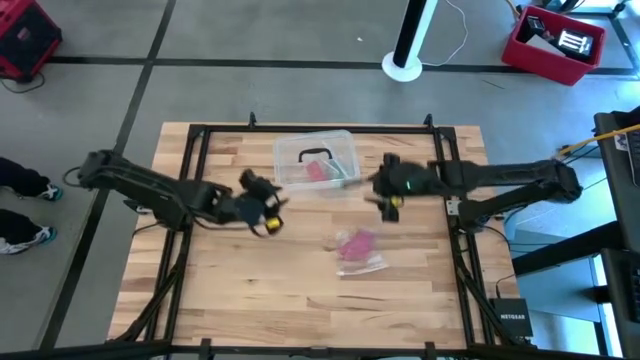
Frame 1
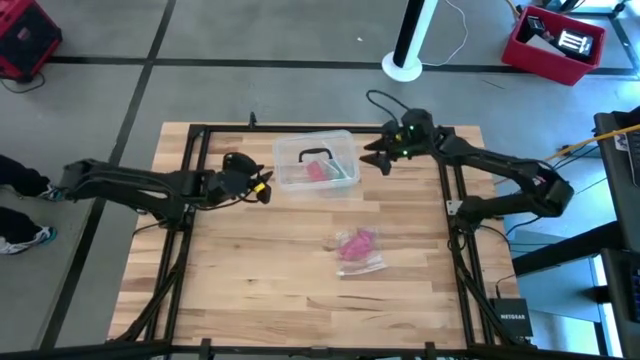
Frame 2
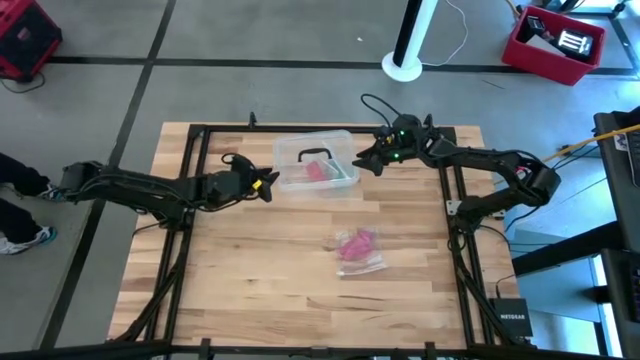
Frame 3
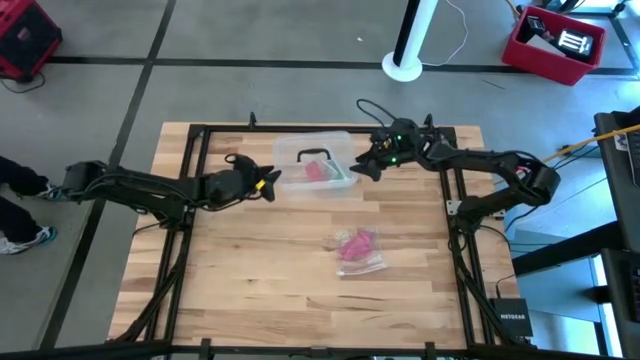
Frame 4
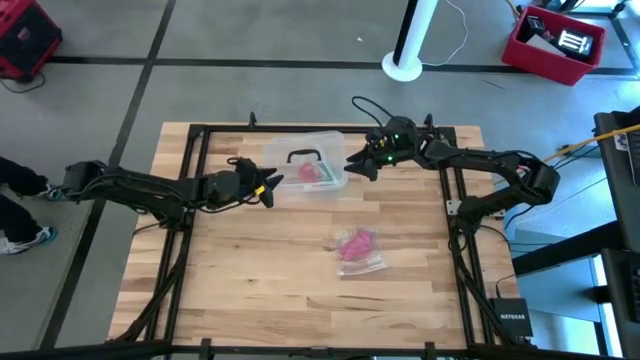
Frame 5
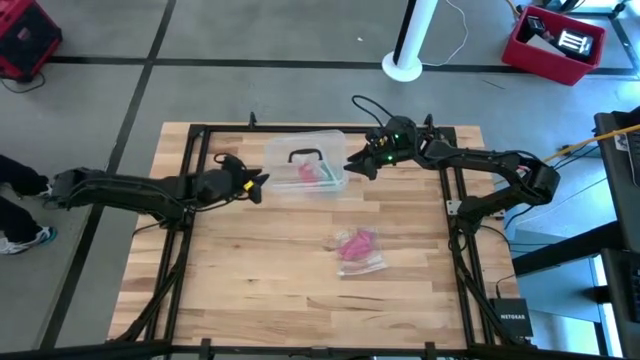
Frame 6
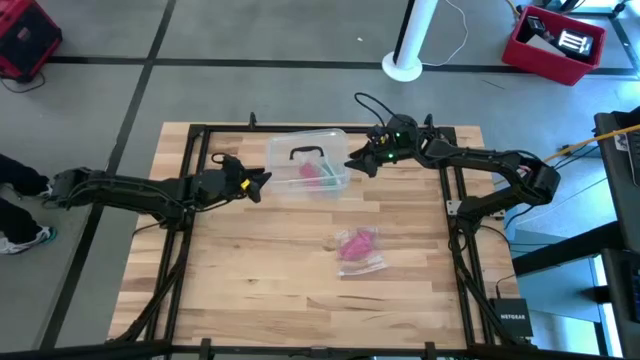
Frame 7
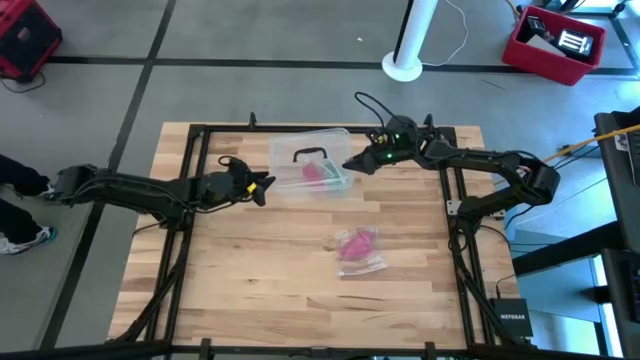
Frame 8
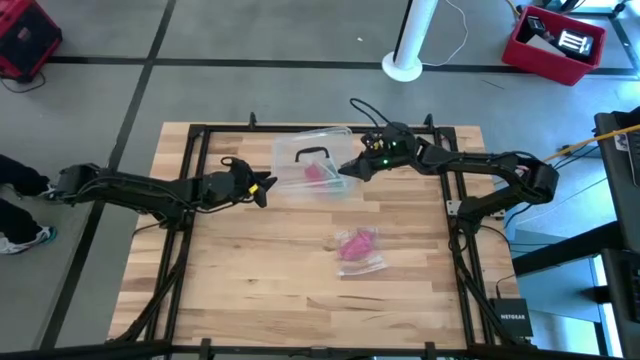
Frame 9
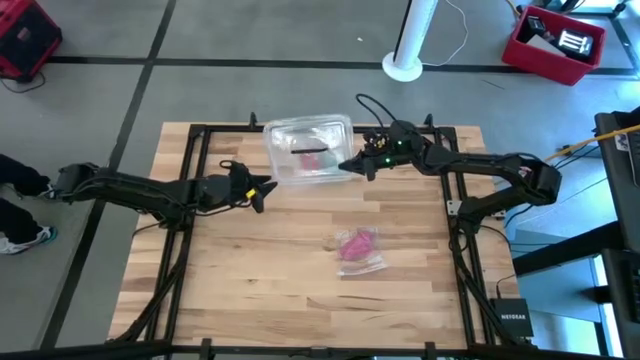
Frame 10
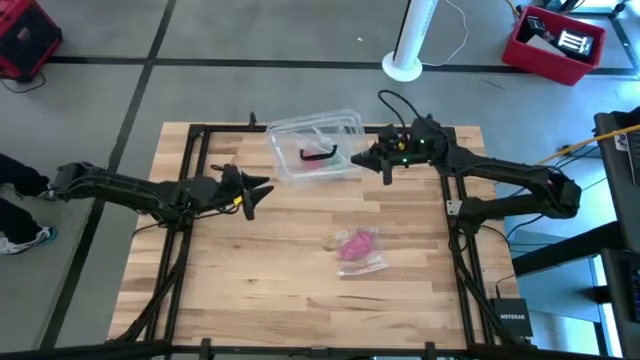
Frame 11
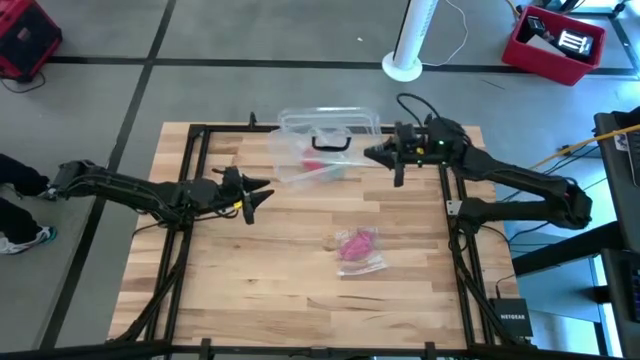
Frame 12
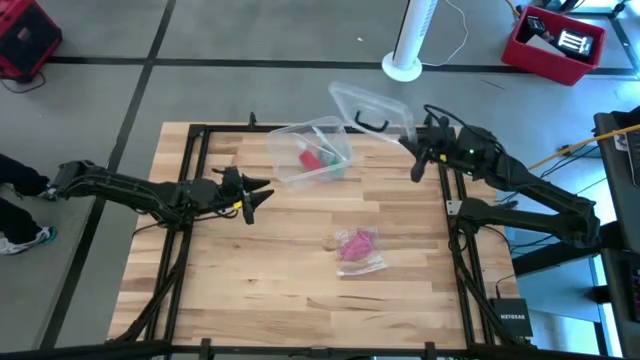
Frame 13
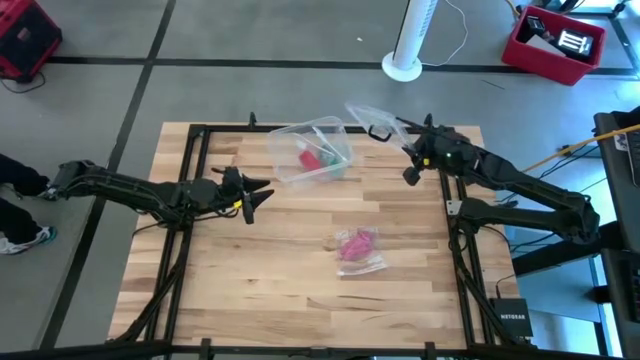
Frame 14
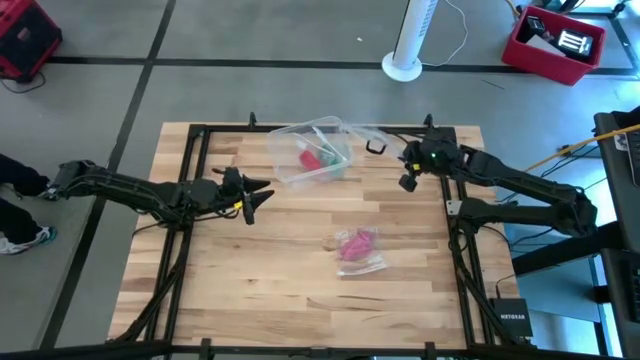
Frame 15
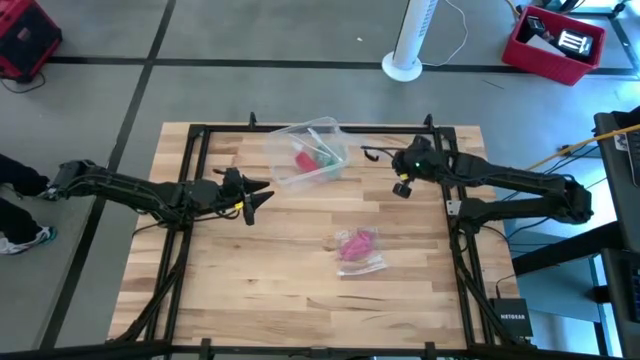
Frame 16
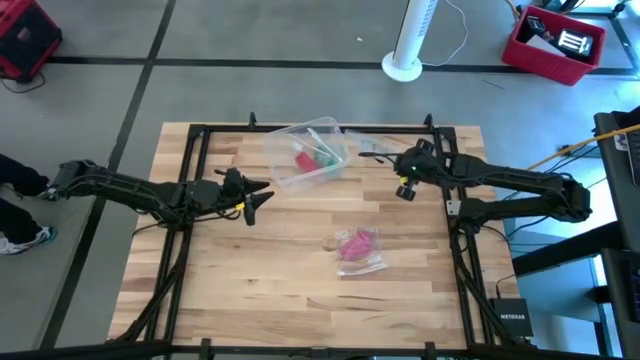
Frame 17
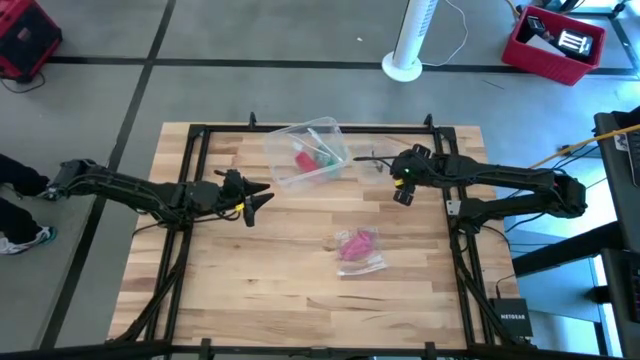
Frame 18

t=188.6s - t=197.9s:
Task: Roll bandage
Open the transparent bin

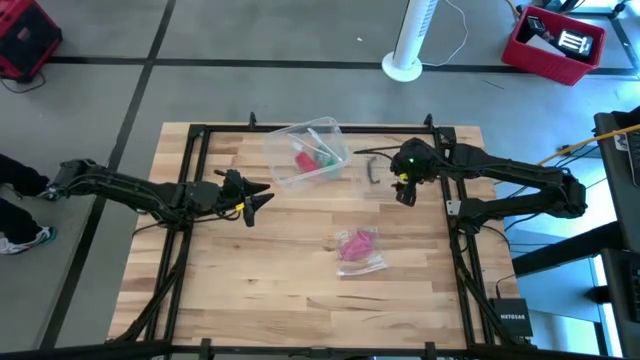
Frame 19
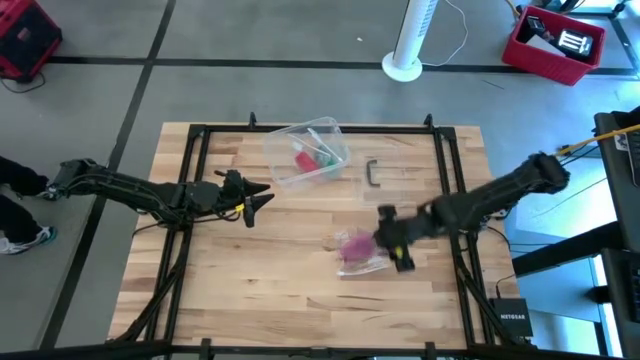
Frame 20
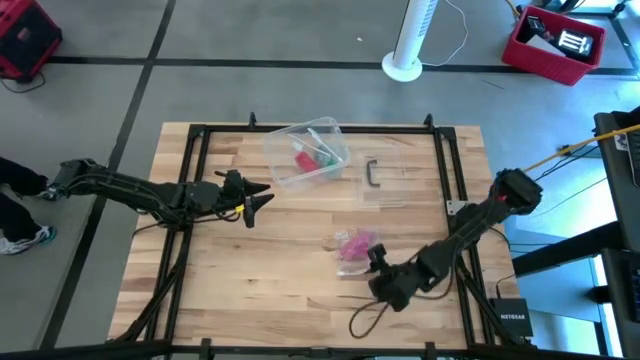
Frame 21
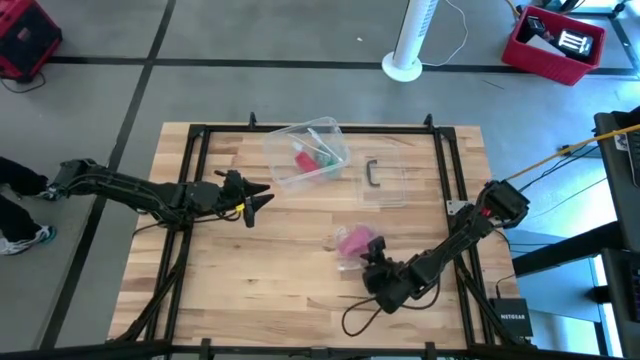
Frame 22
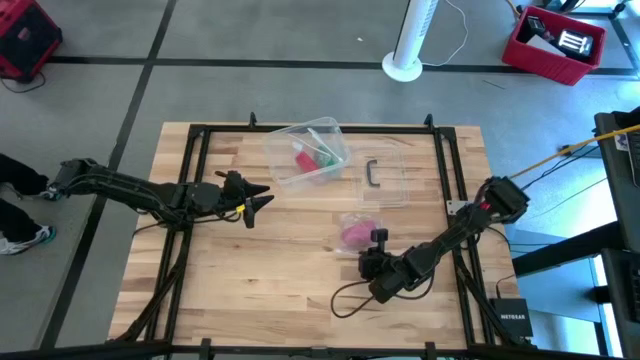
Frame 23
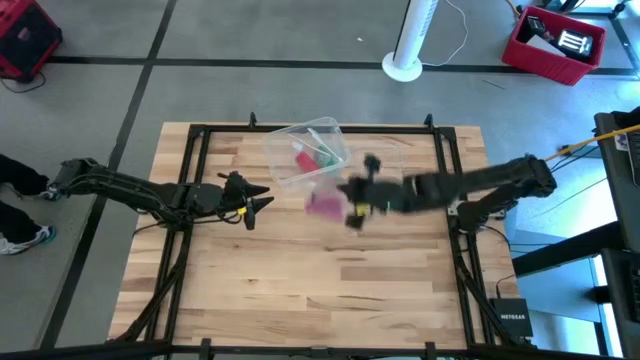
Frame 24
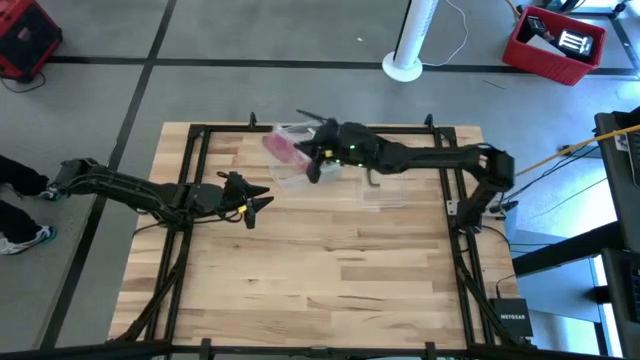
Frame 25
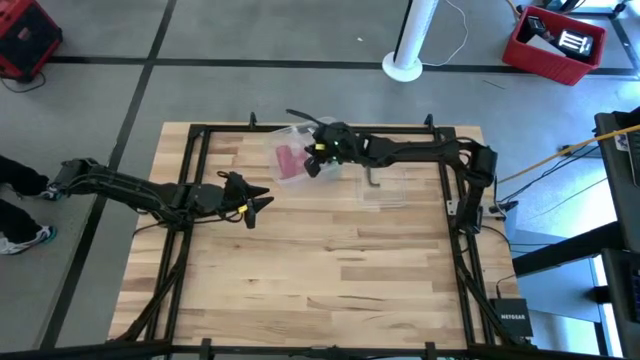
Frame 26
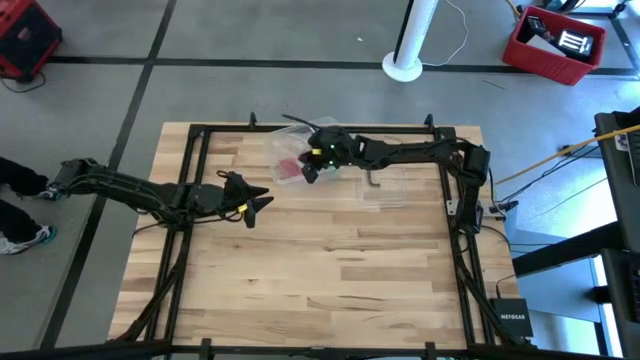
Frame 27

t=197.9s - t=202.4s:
Put the transparent zip bag into the transparent bin

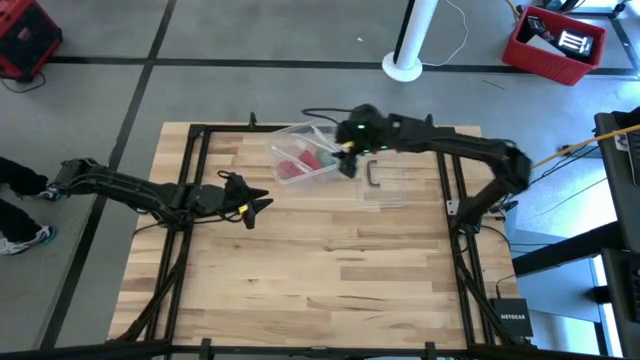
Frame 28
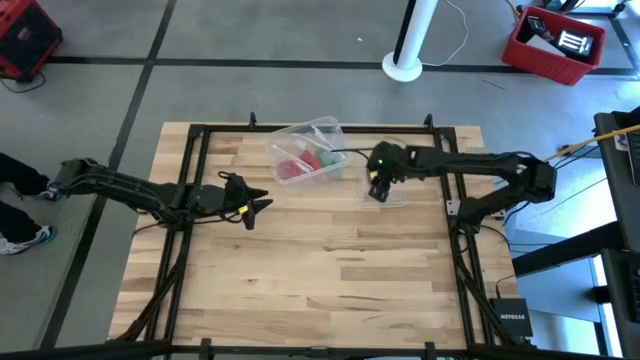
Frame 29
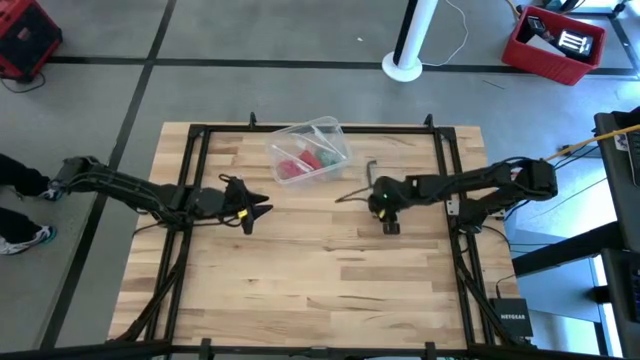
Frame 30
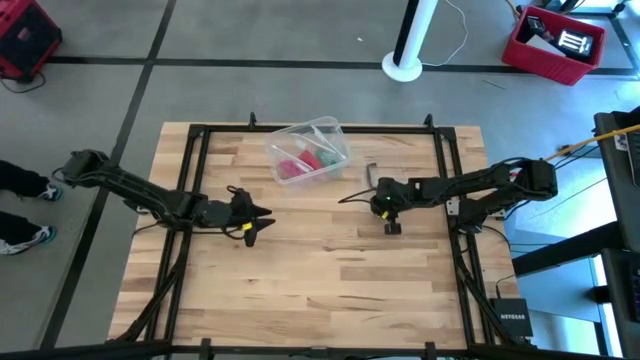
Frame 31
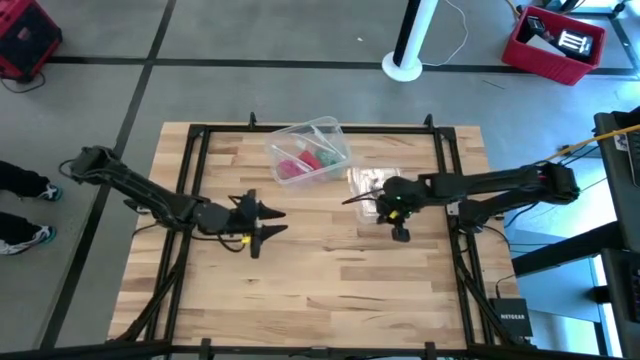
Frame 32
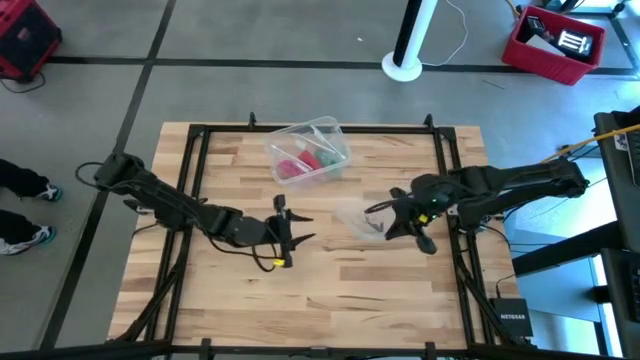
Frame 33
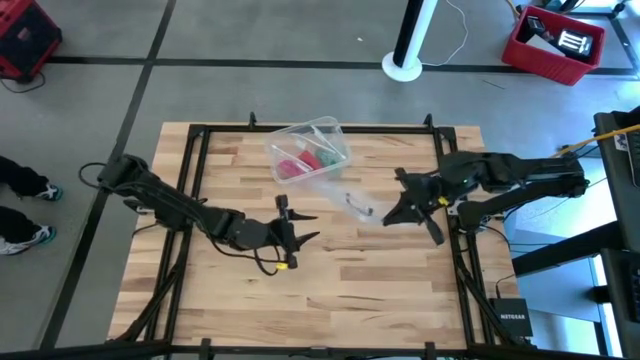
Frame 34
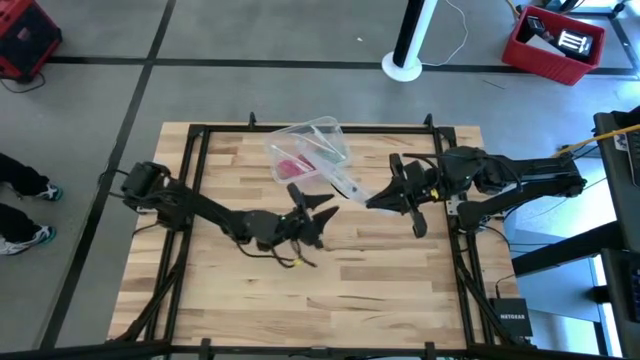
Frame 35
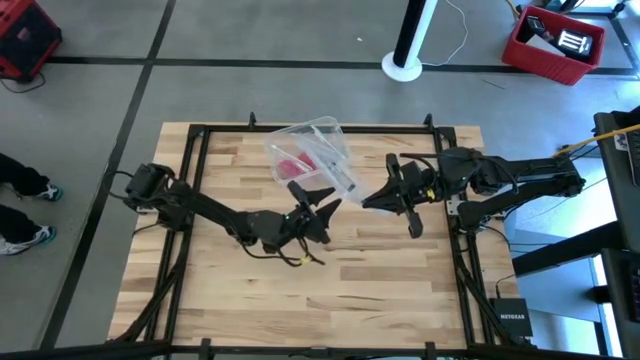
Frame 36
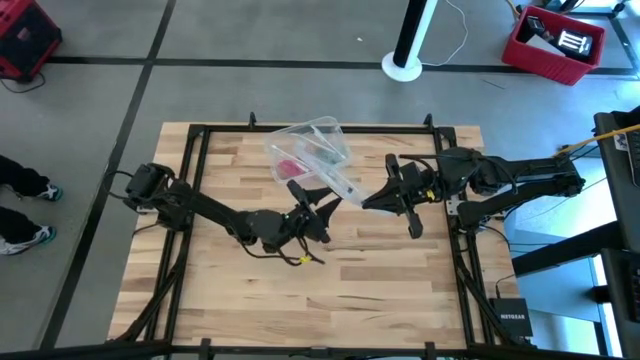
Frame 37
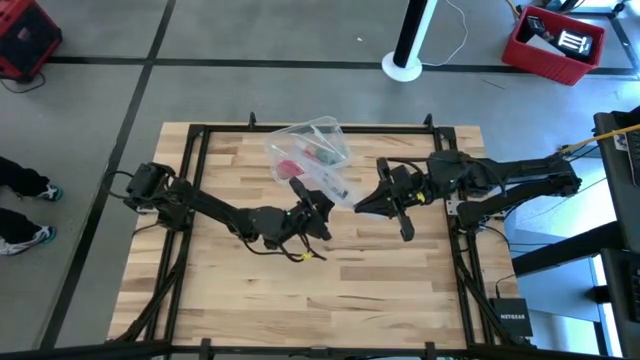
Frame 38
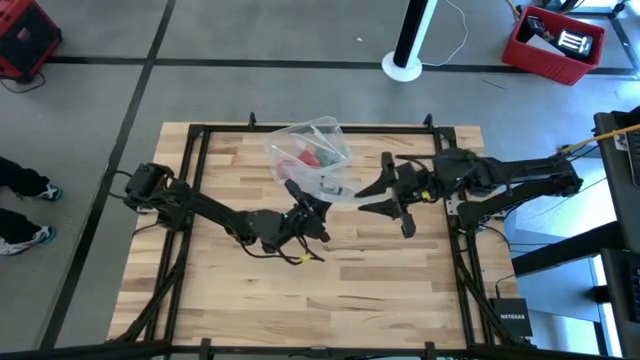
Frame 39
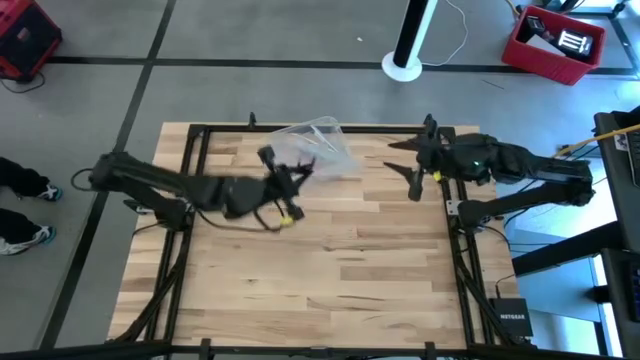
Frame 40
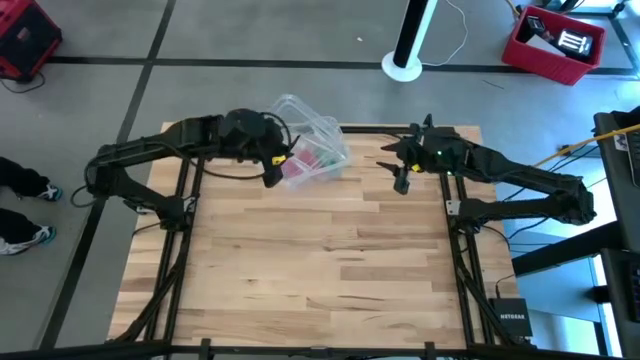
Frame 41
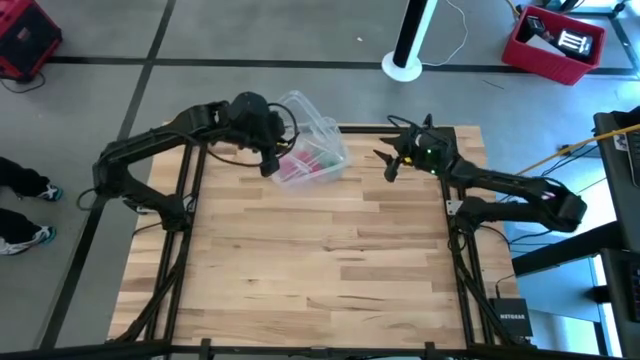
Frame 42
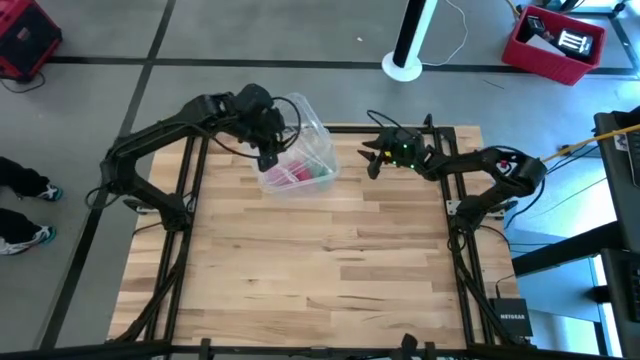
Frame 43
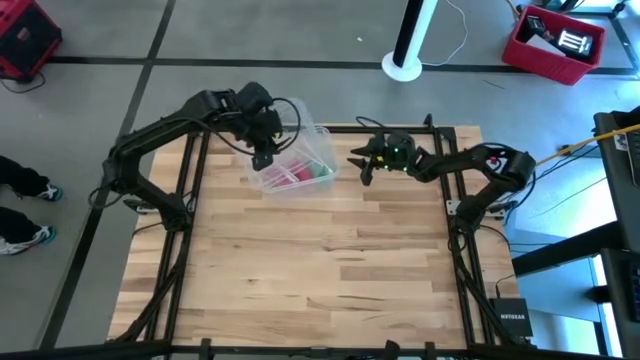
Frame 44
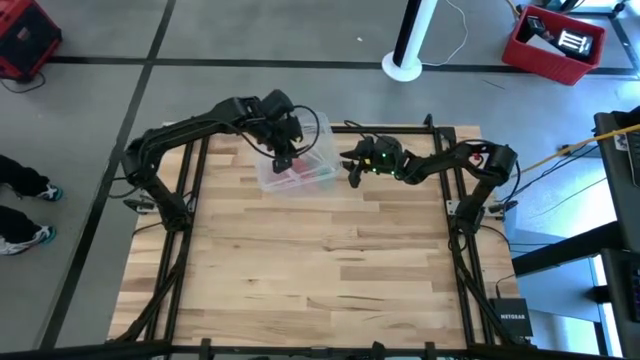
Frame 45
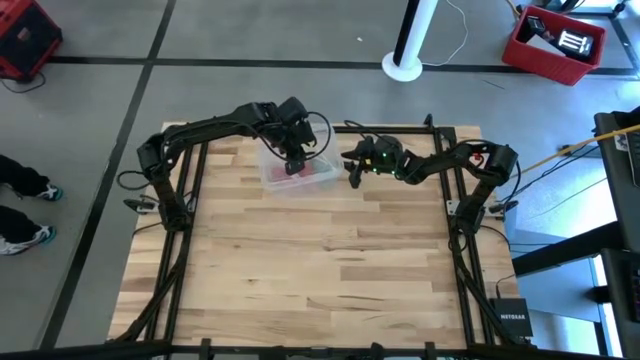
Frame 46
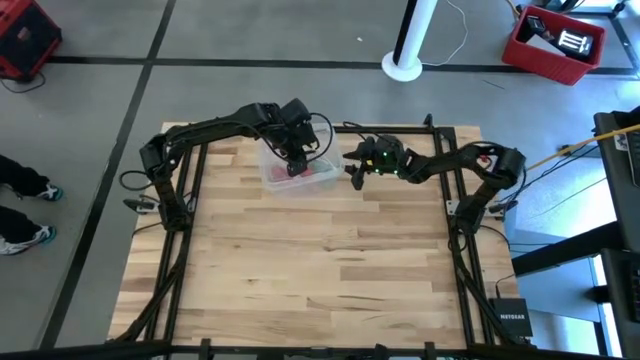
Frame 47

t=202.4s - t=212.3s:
Close the transparent bin
